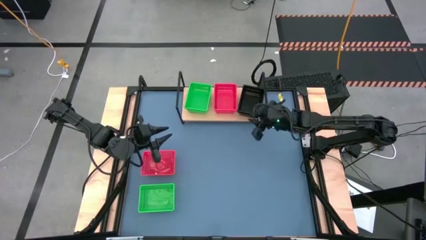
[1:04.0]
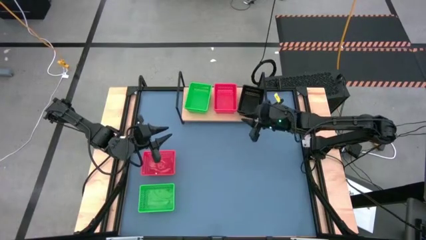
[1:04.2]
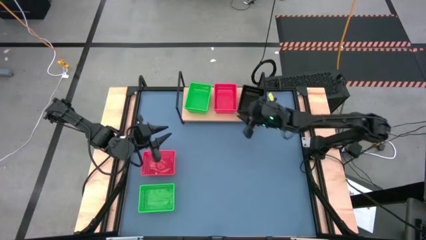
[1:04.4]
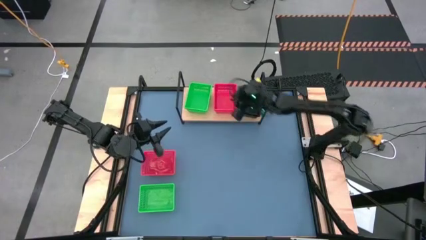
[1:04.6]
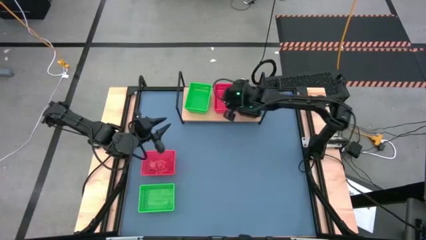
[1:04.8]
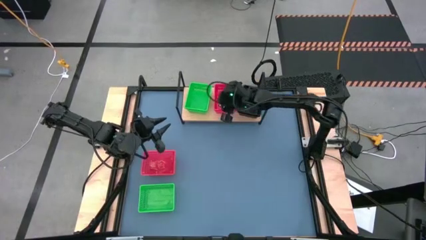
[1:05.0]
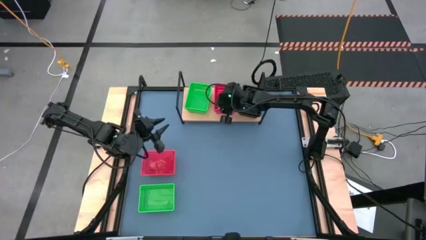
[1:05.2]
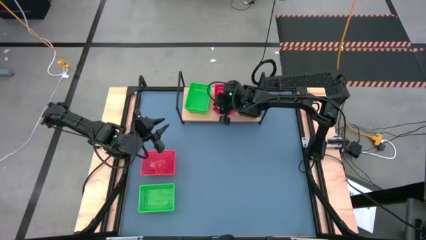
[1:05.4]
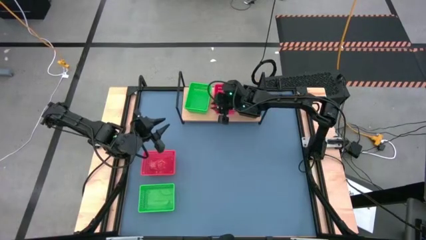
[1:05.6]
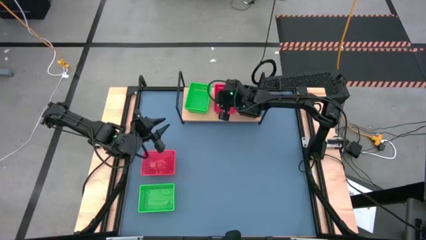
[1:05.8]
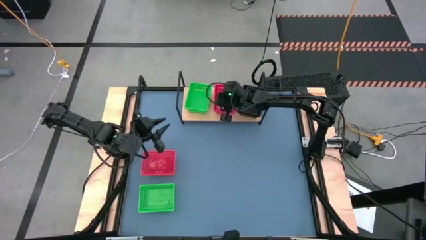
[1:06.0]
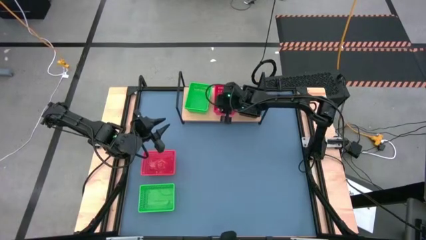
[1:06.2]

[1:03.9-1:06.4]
Task: Stack baskets on shelf by color
Adjust the stacked red bins on the shelf

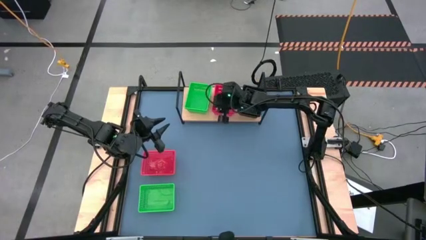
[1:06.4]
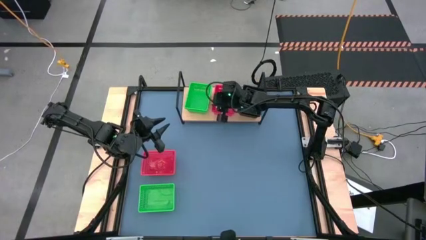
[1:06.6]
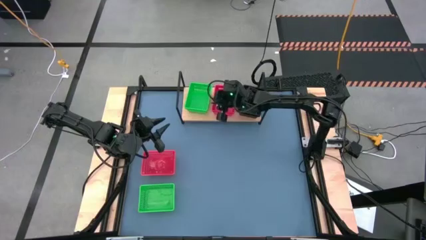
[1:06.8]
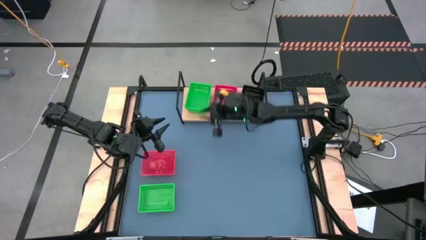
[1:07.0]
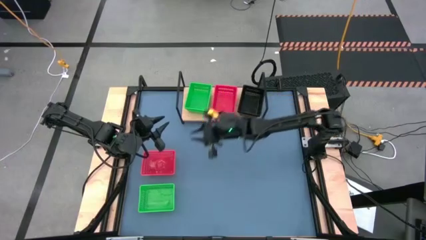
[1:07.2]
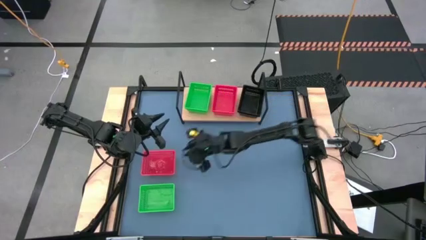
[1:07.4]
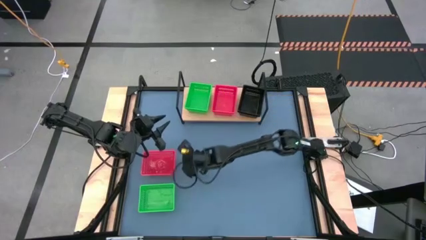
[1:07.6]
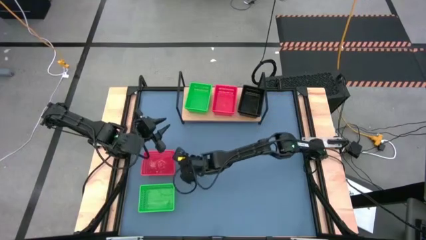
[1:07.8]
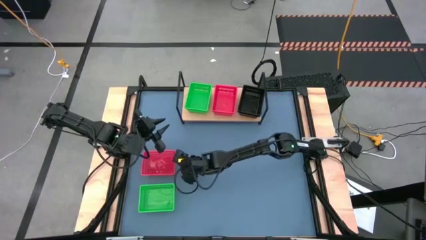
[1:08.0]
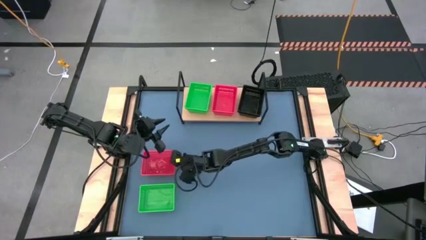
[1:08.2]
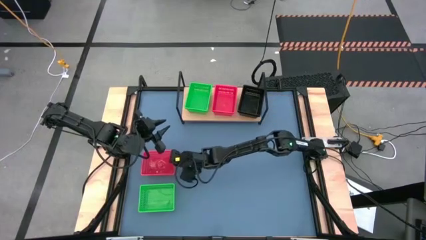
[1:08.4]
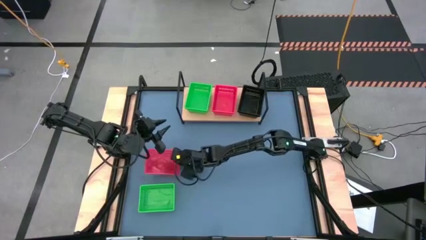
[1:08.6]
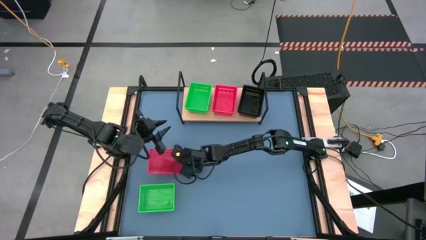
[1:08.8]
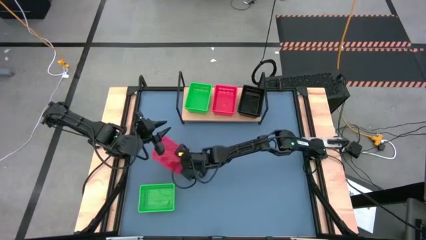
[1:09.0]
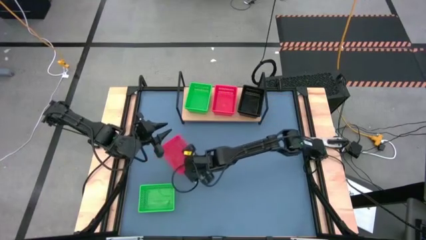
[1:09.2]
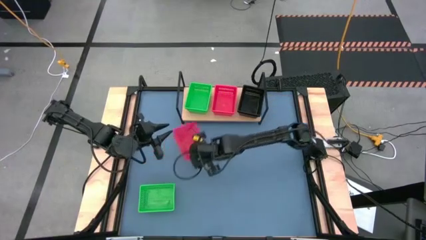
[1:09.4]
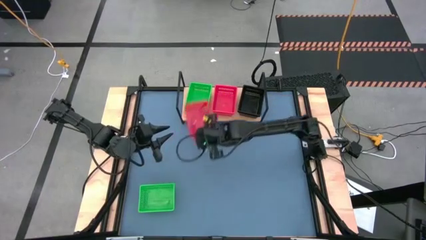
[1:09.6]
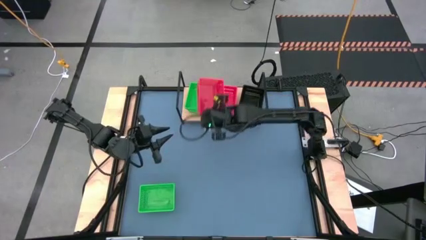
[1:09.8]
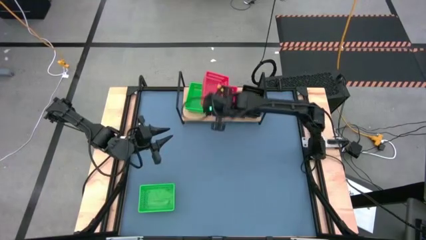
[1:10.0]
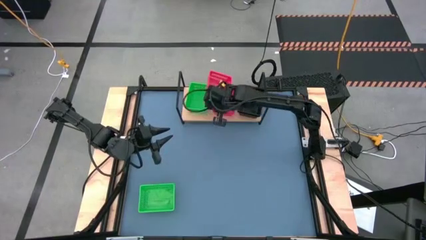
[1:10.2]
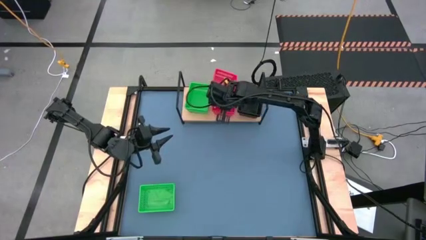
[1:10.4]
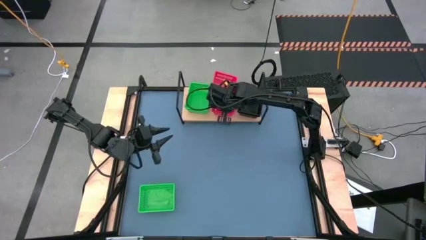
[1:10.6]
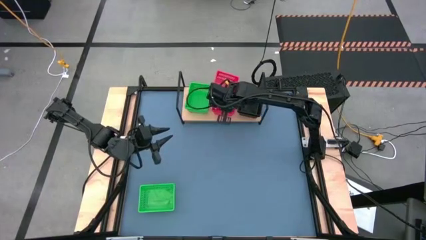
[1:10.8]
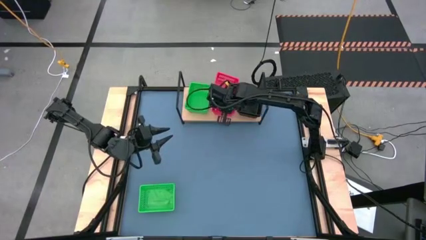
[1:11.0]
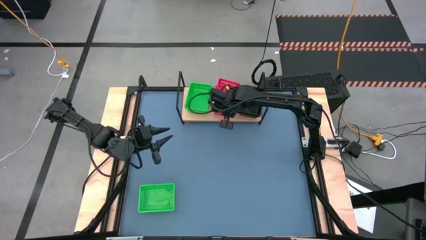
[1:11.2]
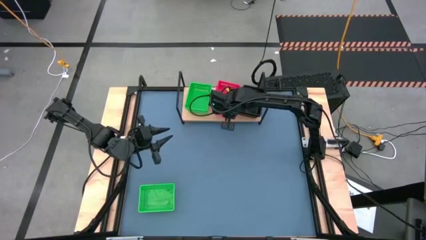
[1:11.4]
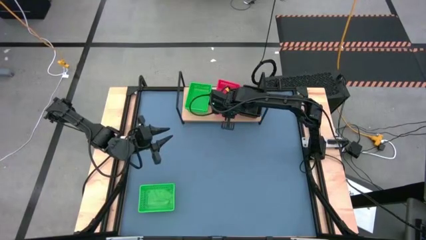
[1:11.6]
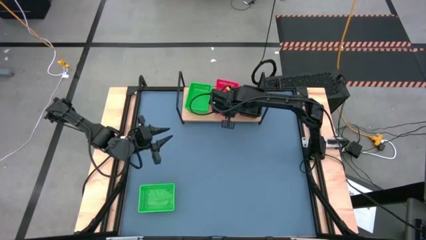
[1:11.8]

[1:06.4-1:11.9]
Stack the red bin on the red bins on the shelf

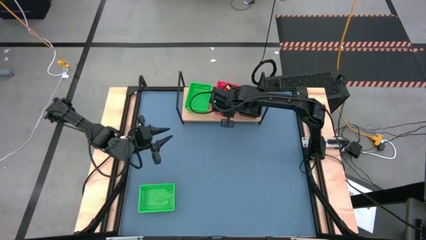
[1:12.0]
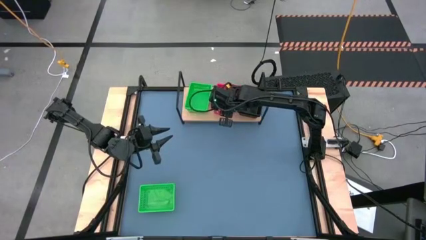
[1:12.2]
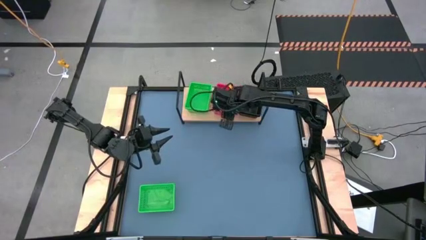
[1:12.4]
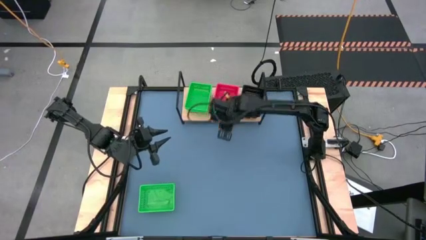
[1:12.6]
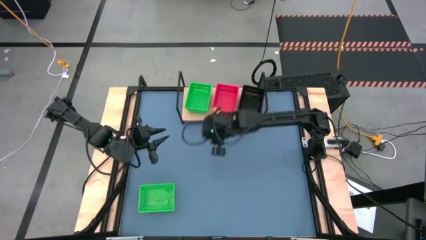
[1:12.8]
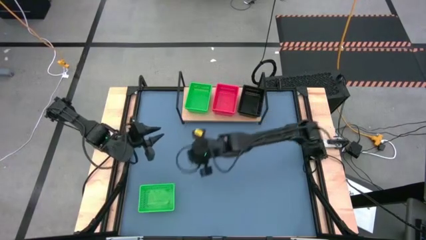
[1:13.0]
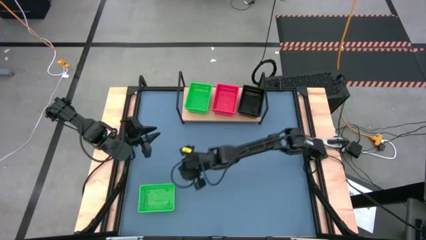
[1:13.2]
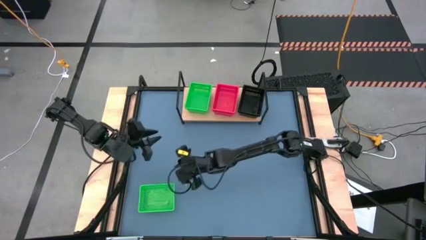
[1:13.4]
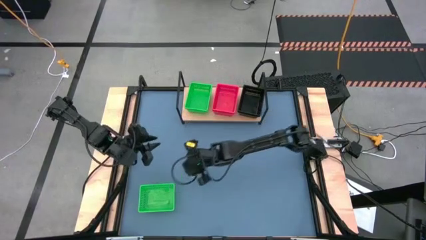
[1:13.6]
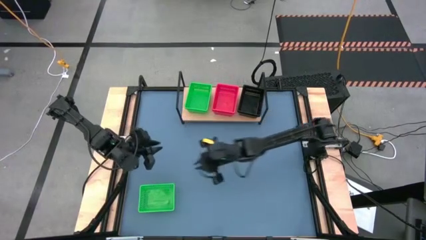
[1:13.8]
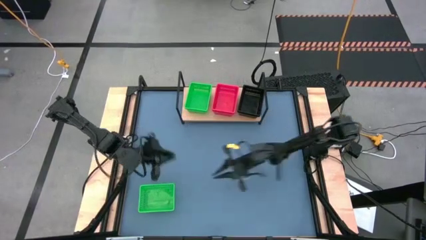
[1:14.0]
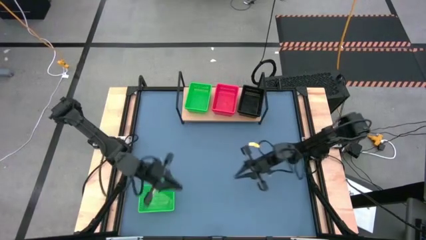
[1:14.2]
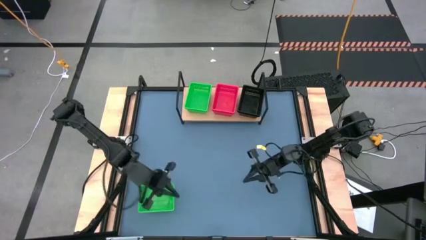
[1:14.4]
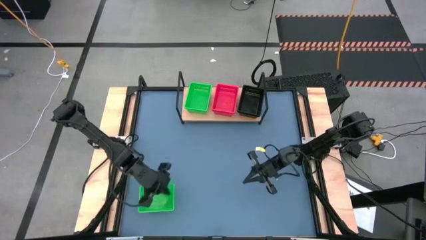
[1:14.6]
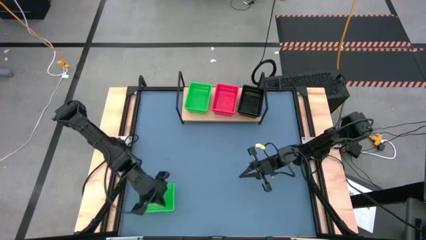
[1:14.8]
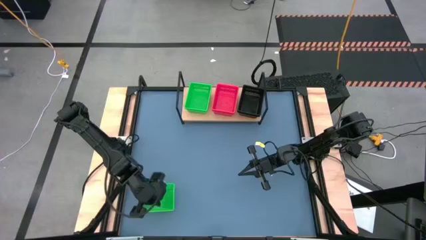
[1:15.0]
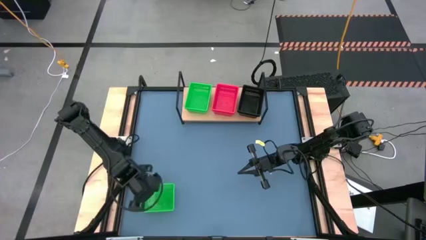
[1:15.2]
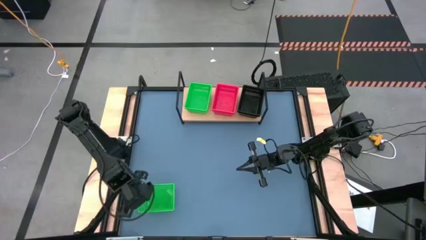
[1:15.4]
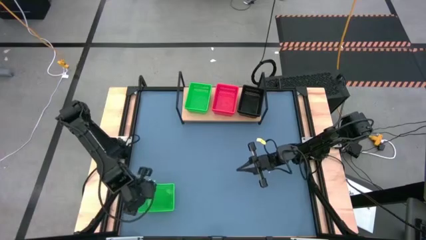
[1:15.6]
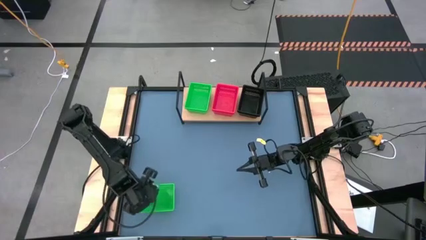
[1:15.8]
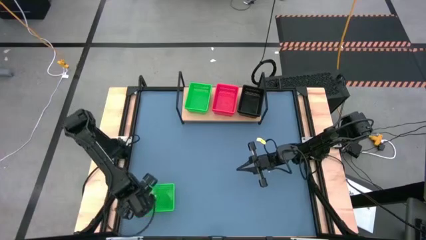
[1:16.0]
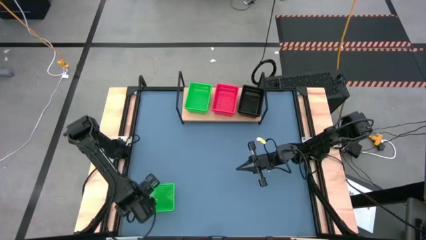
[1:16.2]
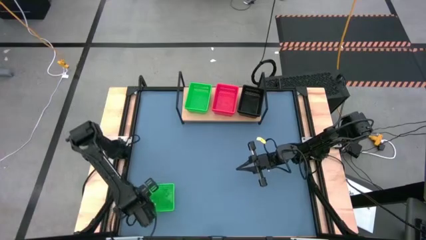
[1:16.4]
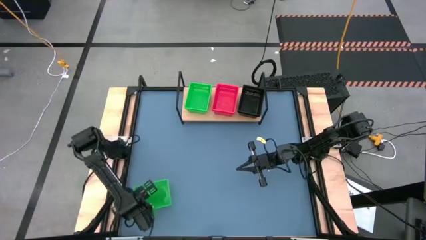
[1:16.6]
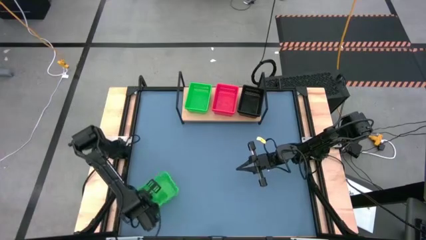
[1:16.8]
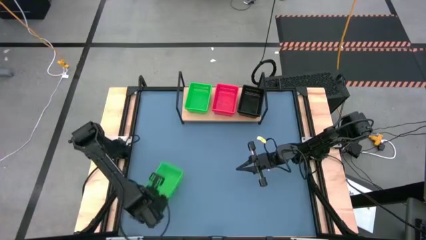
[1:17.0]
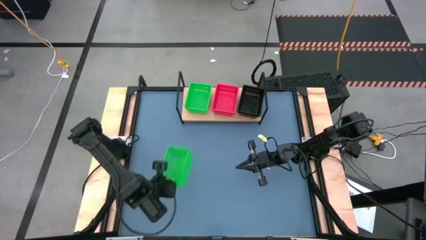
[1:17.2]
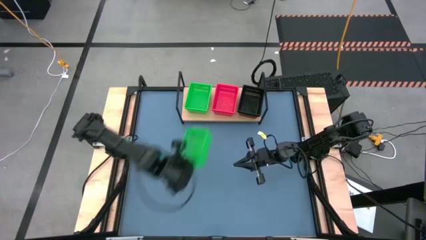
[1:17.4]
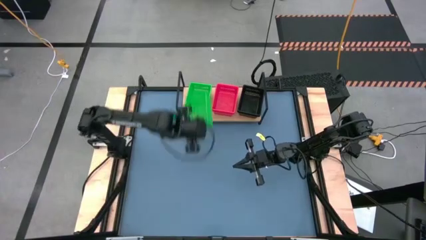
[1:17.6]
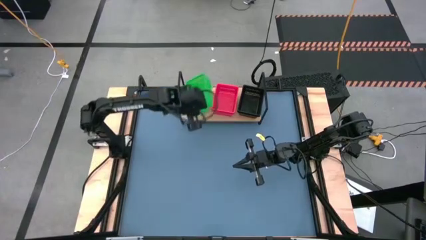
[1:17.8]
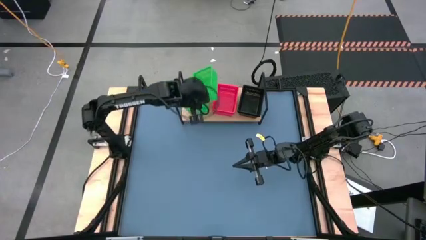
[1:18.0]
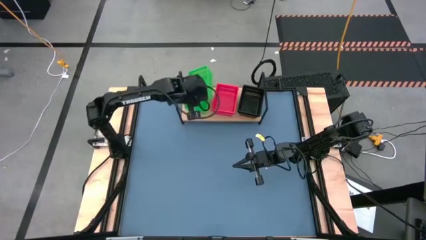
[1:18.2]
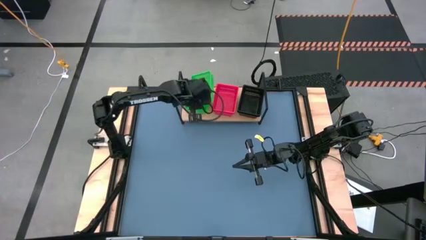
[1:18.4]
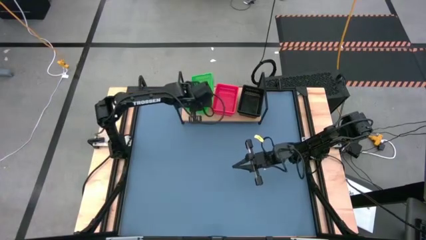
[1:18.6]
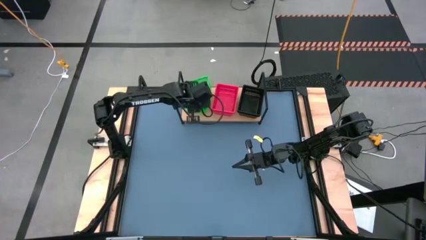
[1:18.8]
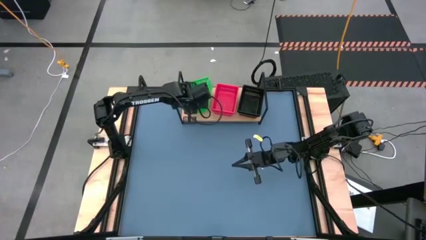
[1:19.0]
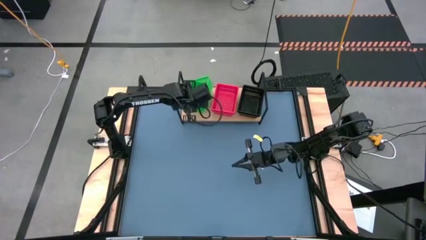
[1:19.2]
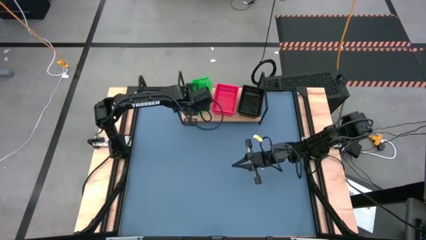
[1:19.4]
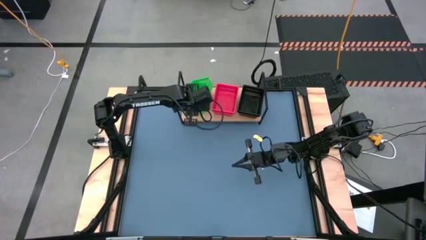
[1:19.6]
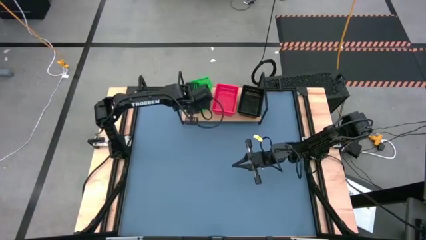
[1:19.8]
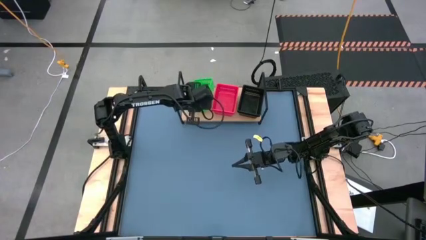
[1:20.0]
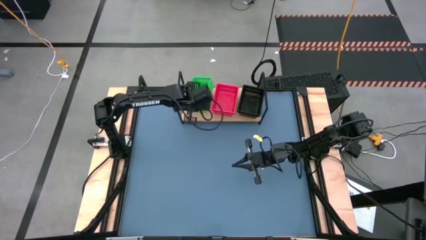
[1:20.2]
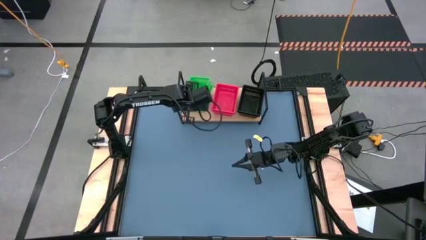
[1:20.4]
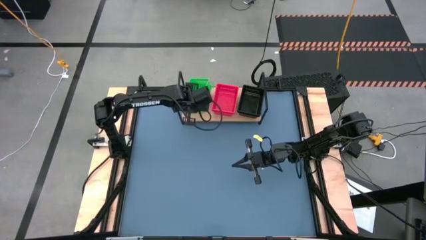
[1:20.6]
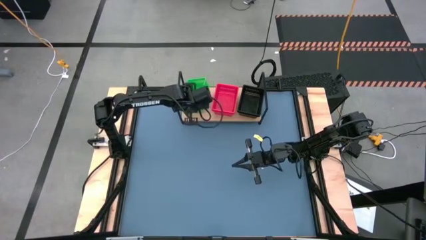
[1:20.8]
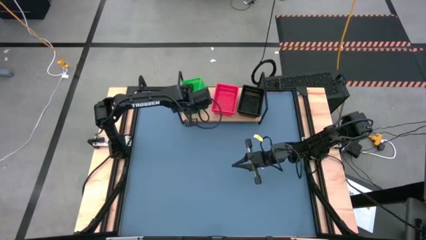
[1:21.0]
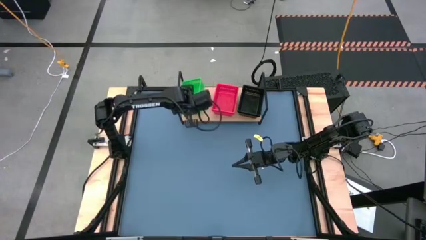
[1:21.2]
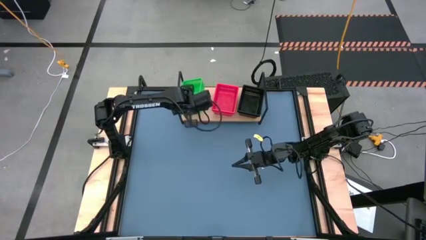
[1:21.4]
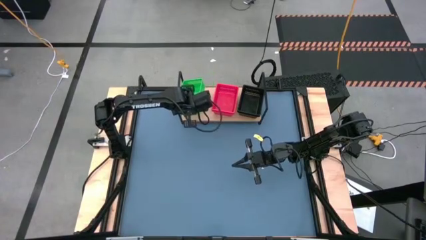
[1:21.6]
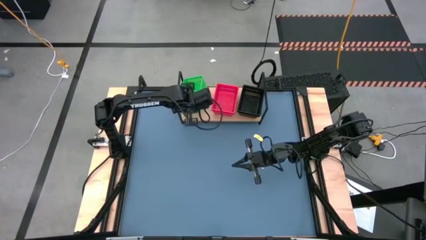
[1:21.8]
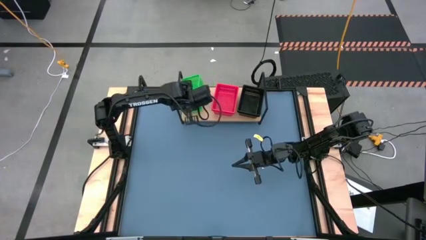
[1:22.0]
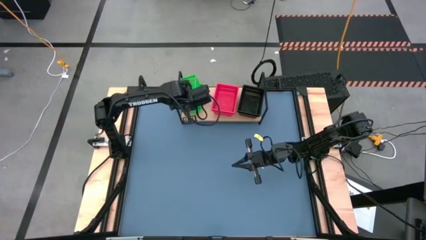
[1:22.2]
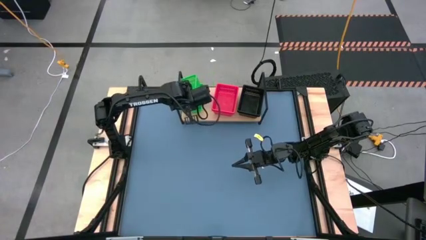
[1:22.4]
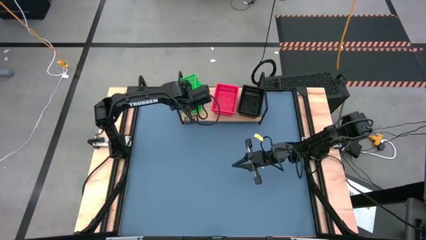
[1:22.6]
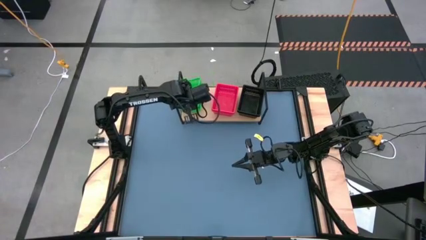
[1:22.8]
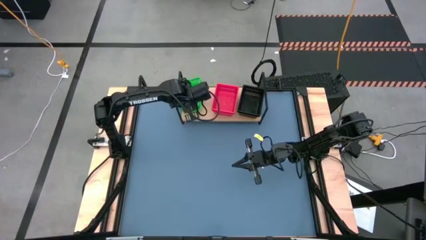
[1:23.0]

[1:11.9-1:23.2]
Stack the green bin on the green bins on the shelf
